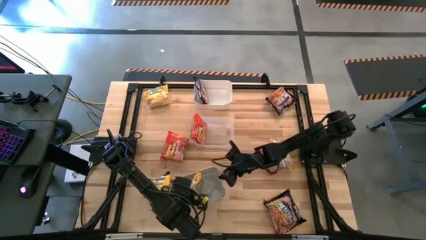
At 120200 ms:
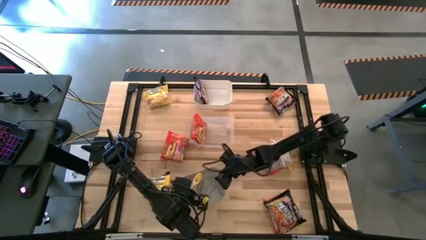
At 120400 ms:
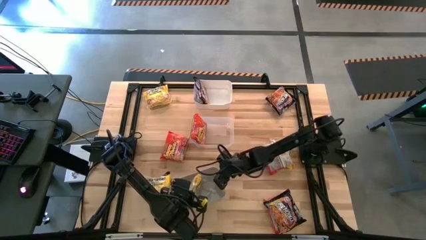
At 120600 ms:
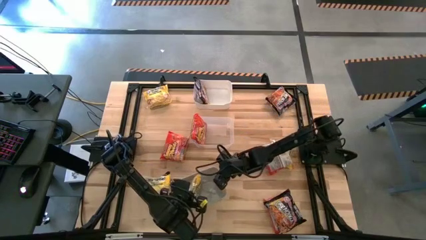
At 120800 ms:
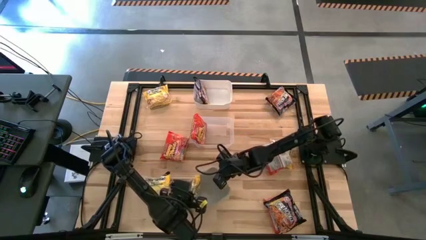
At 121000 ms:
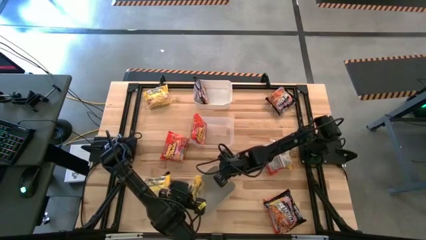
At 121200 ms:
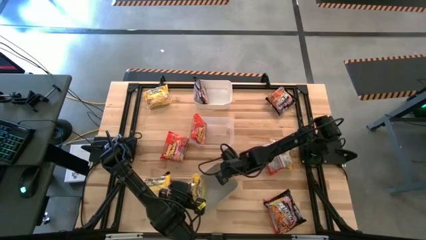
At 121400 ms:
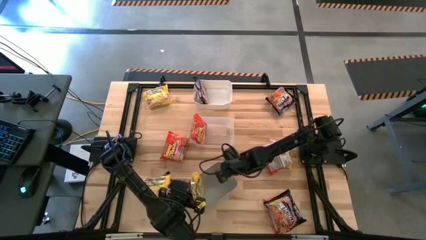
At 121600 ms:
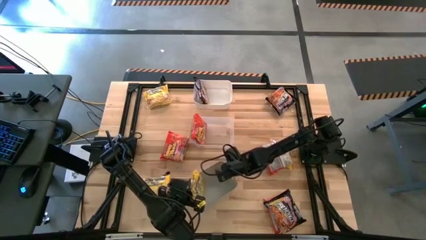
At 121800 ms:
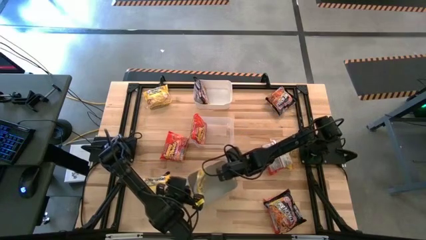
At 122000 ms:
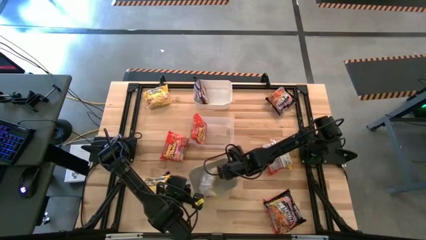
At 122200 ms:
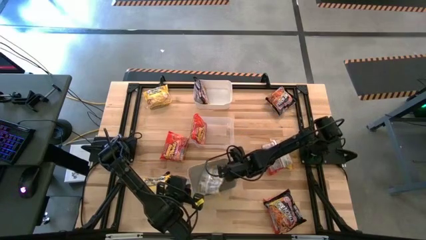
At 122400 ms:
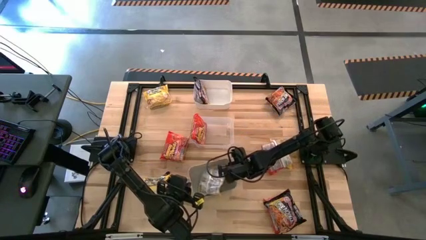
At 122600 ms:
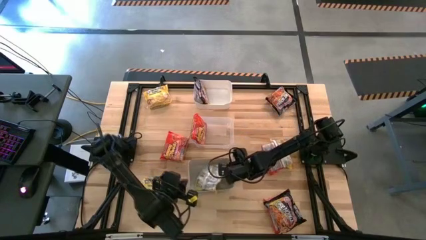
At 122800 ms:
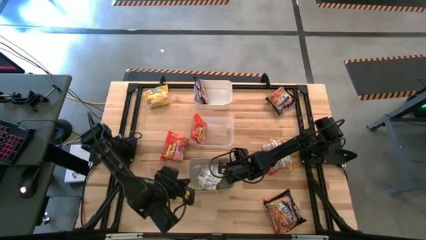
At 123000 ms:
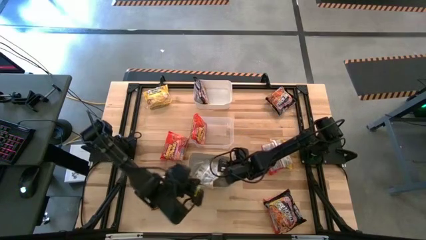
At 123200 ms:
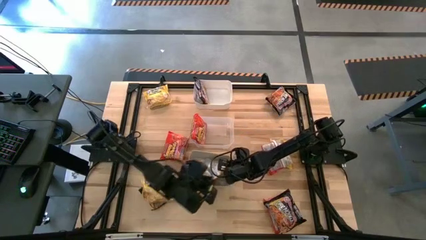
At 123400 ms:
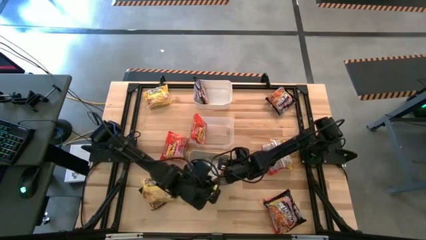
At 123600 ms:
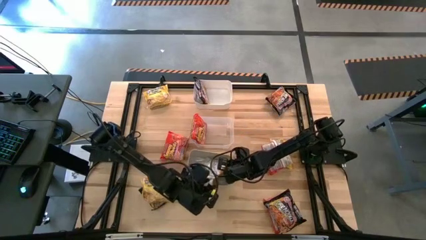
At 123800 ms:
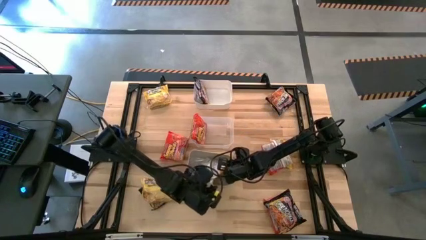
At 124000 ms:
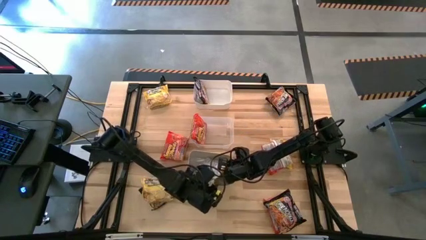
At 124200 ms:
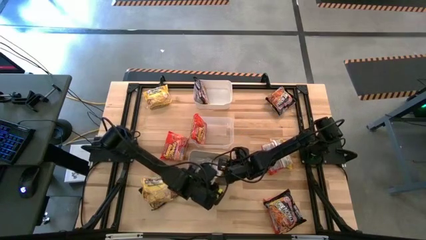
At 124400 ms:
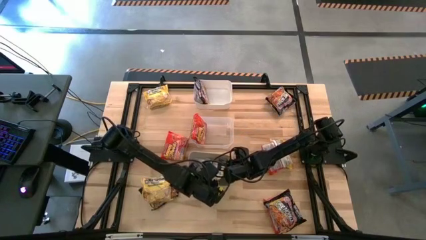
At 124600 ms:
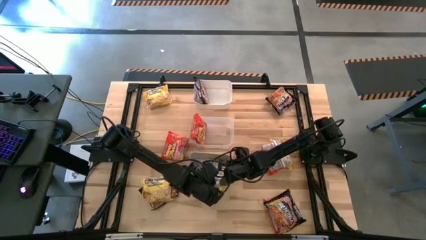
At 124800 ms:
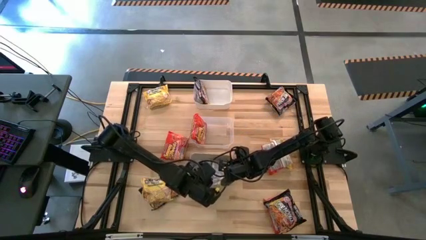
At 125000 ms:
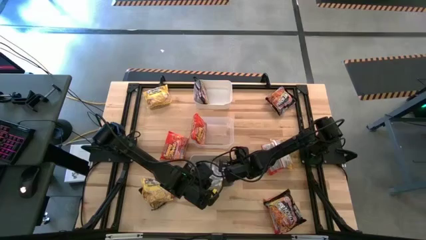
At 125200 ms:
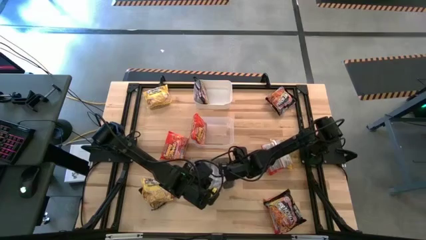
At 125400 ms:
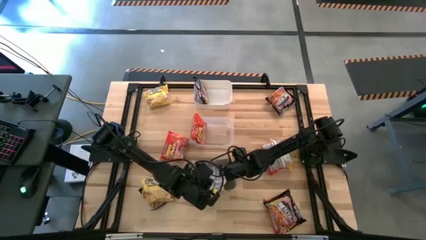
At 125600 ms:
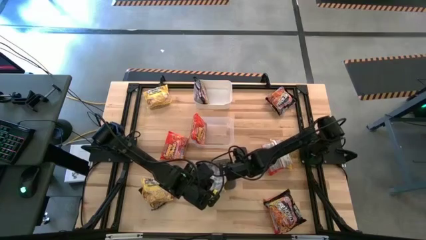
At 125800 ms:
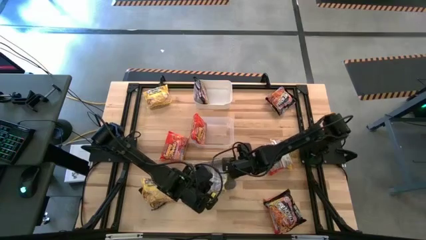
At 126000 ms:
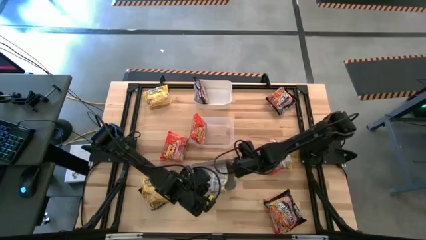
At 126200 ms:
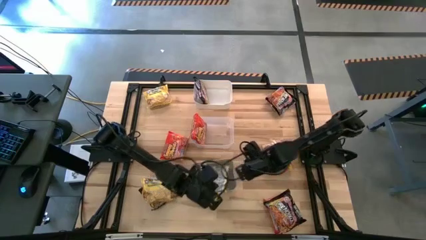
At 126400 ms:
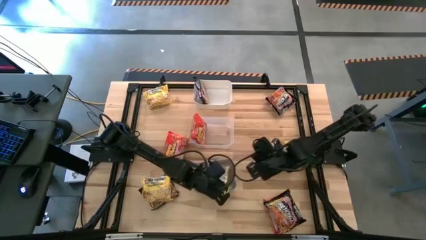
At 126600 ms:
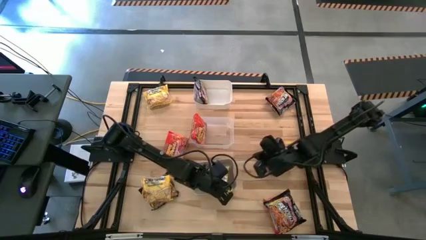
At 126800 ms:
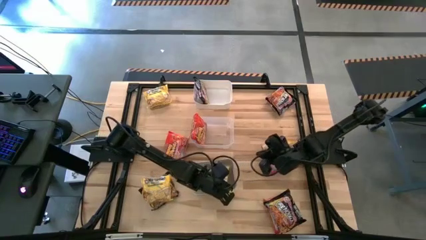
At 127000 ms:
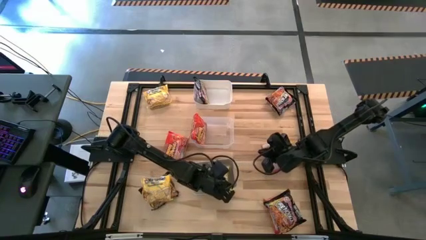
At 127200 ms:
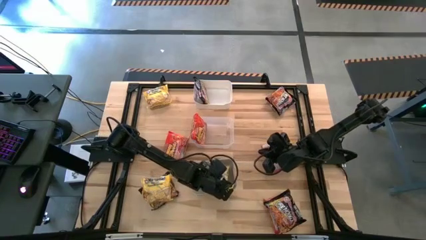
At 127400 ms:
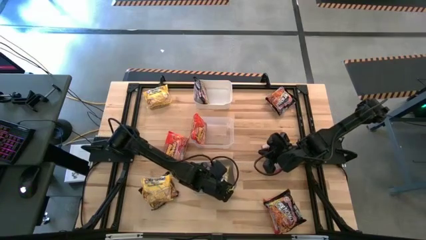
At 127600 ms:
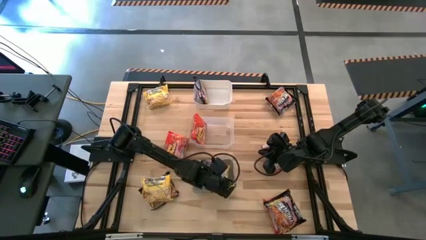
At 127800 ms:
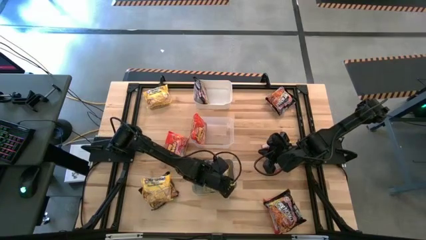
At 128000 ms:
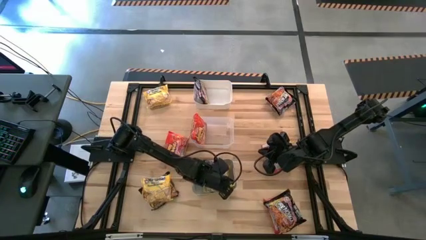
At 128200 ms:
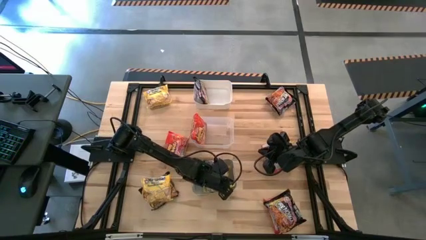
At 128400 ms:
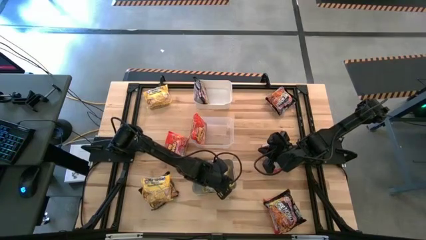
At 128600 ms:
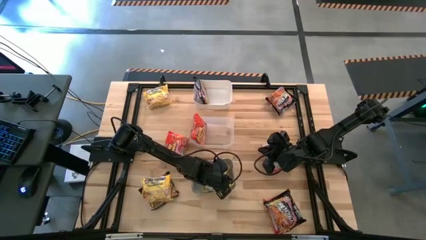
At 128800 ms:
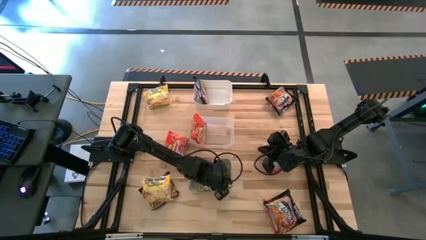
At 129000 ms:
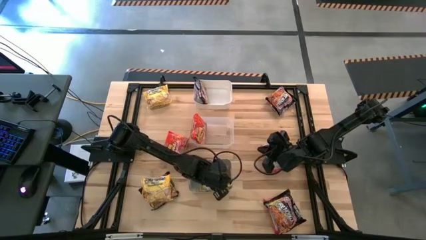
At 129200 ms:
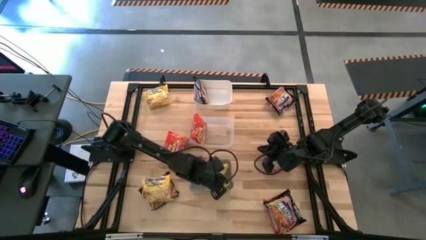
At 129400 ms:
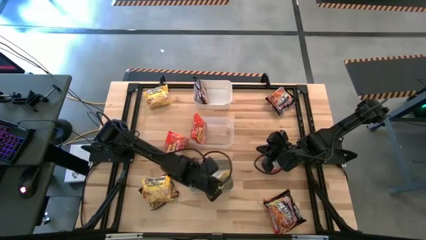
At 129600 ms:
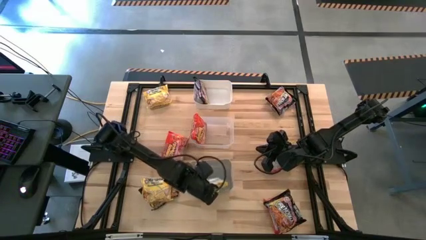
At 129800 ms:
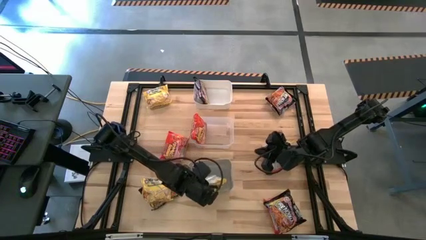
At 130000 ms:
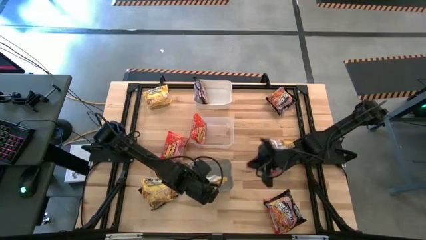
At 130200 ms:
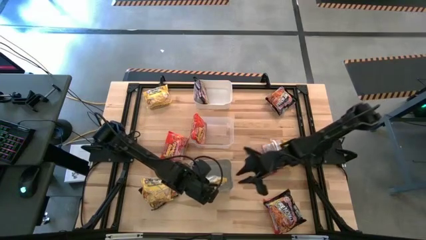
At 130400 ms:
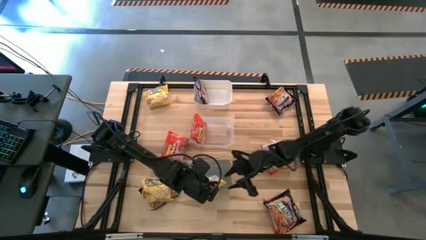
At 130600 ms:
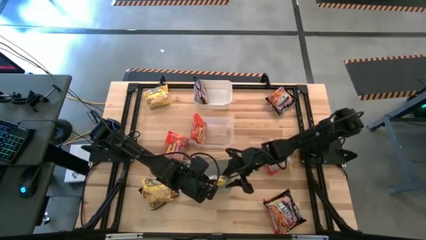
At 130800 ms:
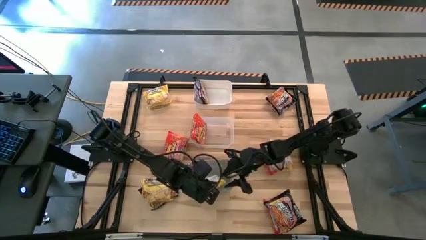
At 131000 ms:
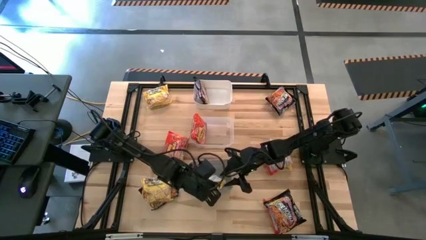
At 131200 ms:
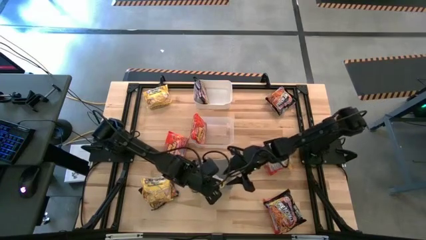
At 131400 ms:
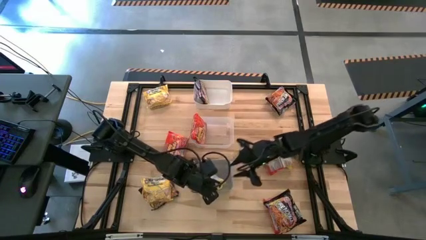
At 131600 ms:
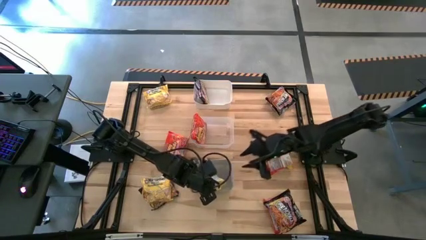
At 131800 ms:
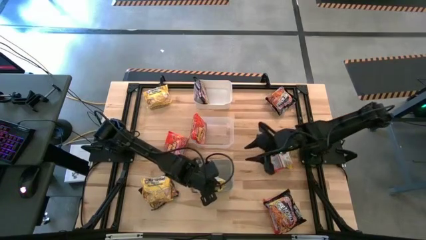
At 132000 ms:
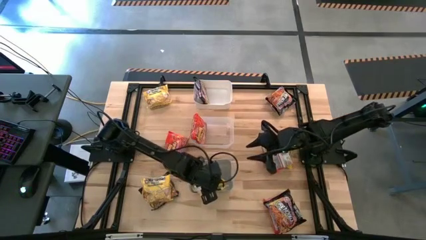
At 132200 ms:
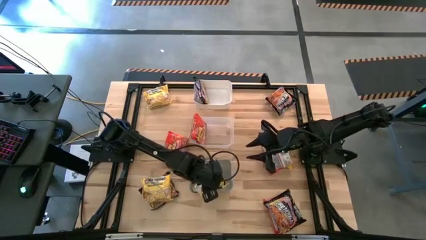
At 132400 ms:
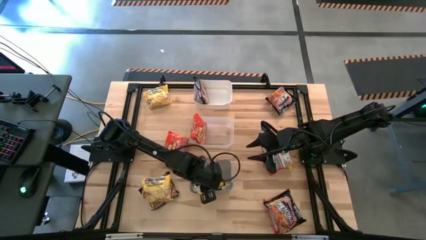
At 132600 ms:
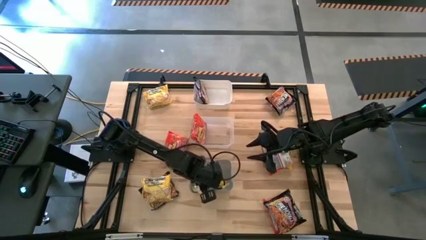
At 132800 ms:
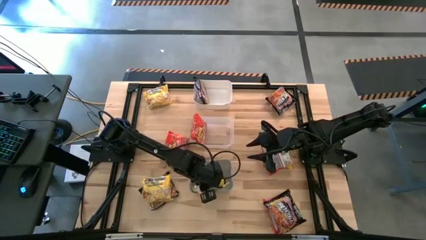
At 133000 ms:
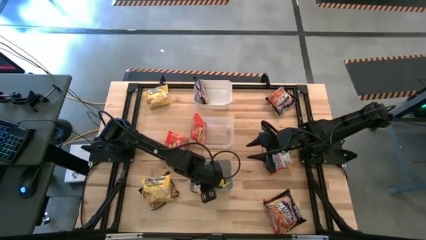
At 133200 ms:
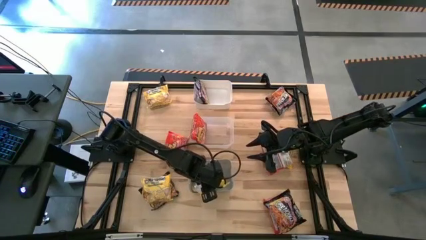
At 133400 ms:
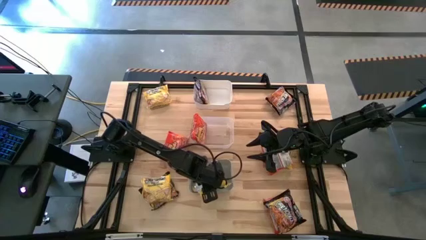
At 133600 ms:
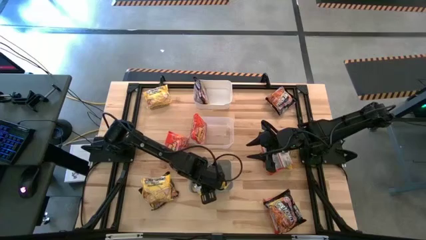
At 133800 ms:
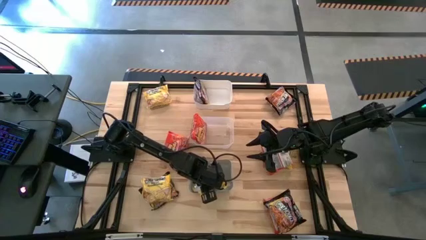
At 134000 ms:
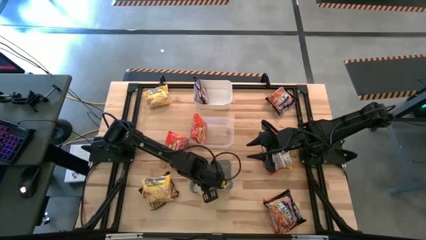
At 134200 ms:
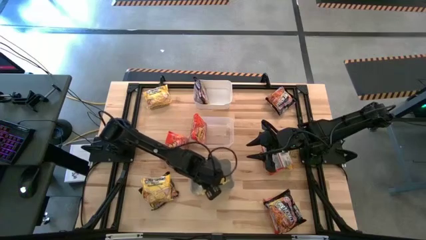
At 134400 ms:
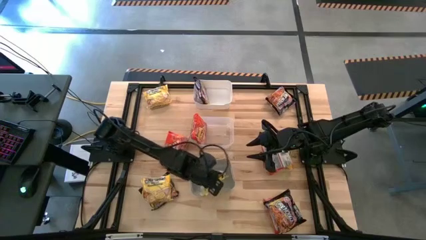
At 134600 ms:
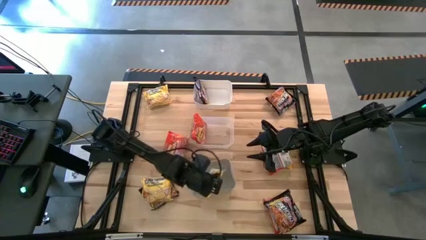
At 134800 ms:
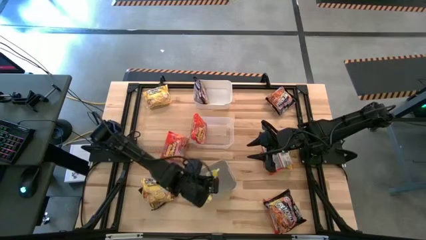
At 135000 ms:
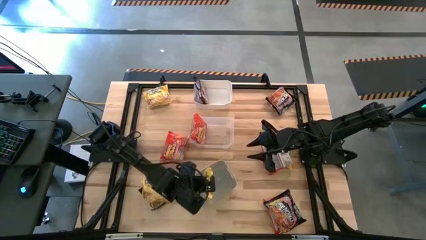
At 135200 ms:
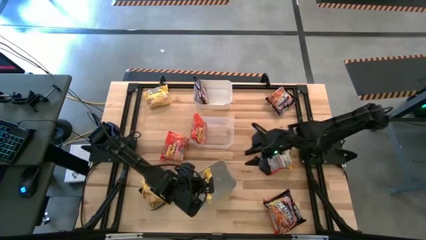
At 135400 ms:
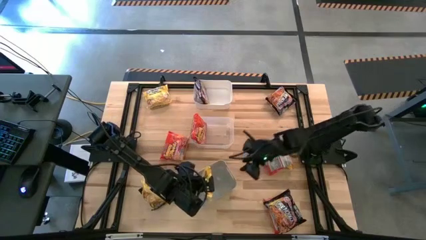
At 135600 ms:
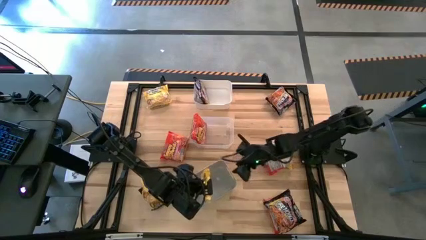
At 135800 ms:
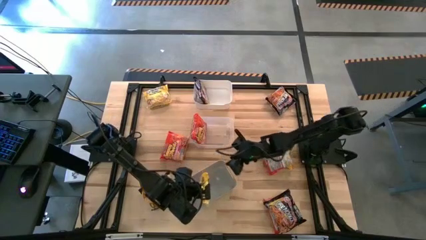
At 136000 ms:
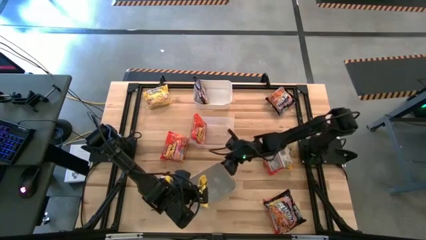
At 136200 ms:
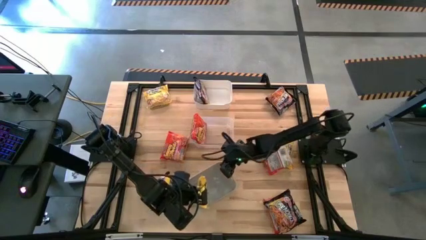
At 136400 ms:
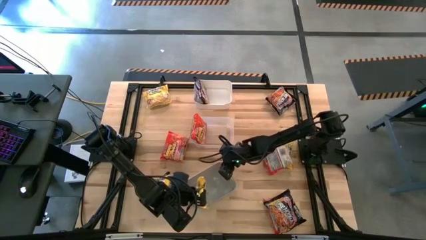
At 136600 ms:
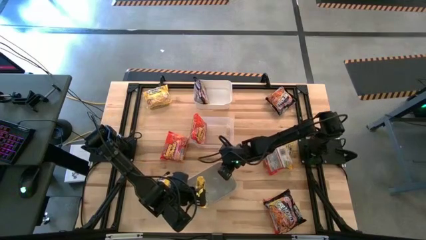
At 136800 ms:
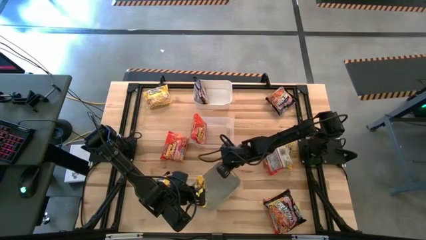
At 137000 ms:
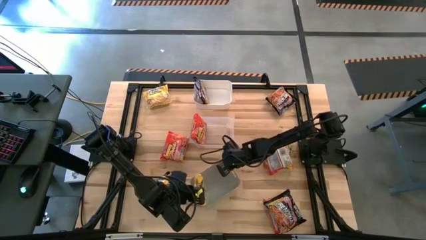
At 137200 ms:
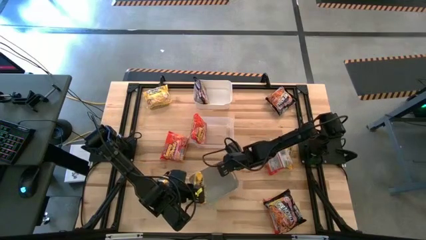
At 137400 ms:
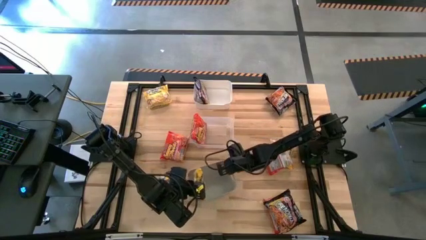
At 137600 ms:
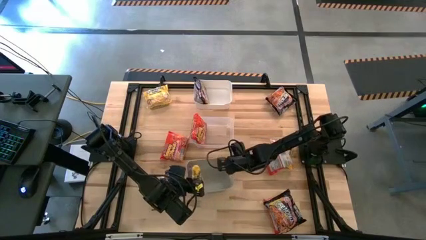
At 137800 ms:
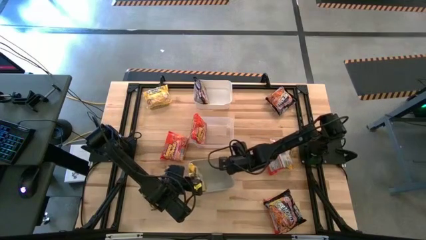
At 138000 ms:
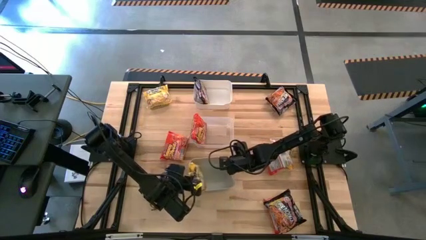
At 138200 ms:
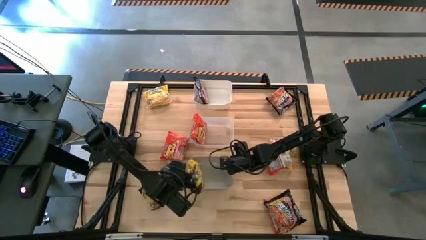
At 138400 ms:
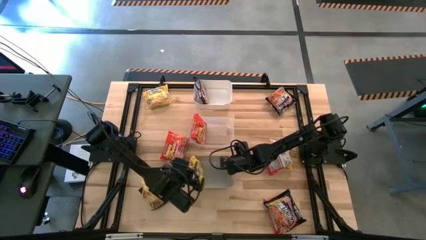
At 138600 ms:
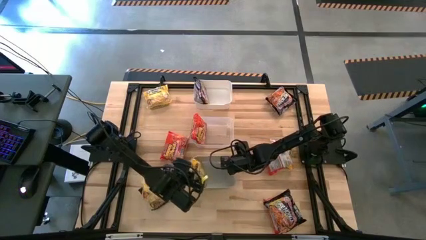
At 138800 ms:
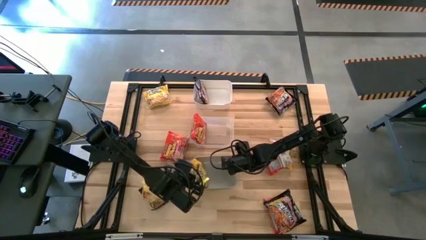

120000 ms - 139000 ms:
Task: Sort Maruchan noodles
Put the yellow noodle pack into the gray bin
